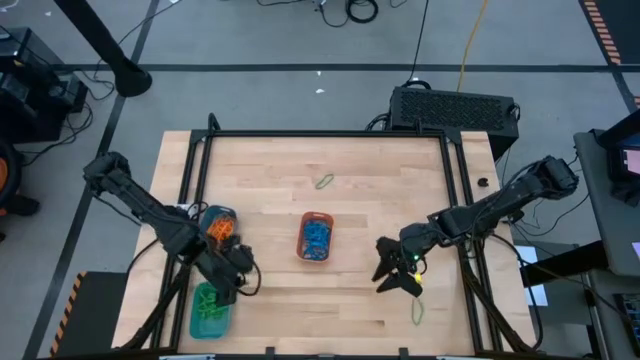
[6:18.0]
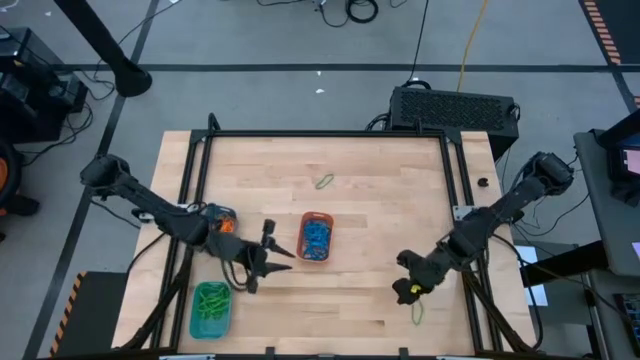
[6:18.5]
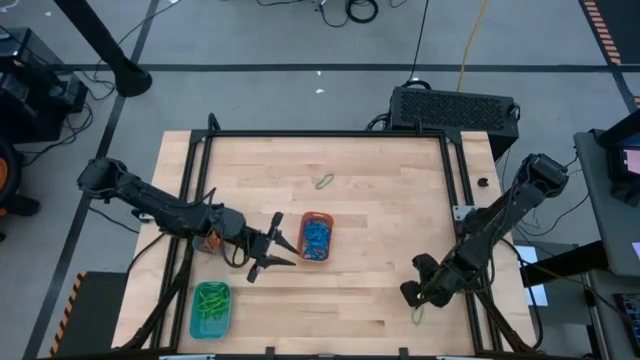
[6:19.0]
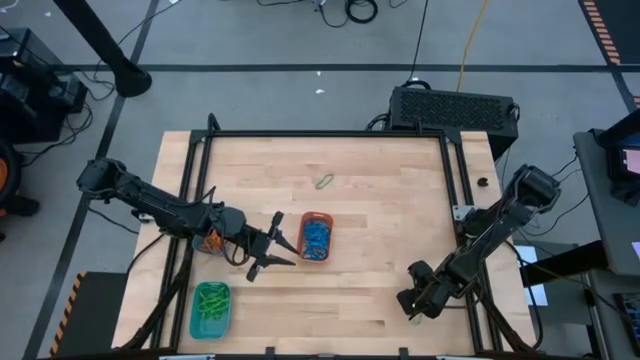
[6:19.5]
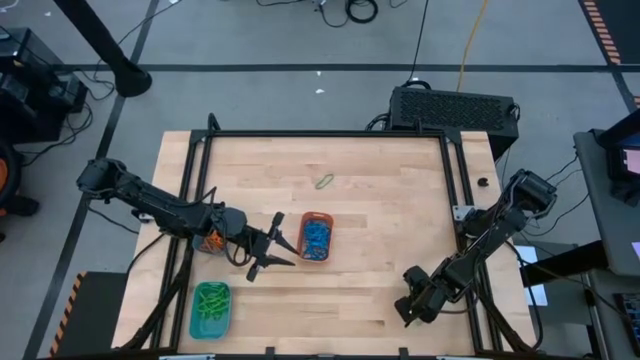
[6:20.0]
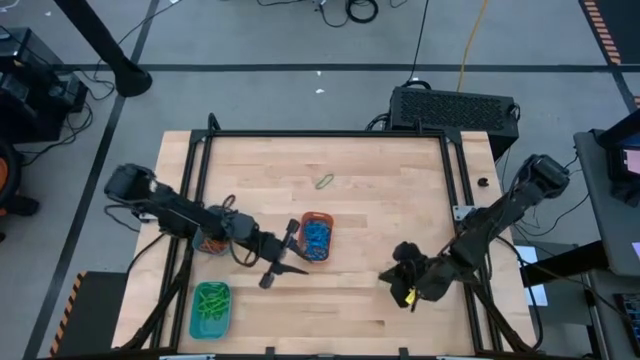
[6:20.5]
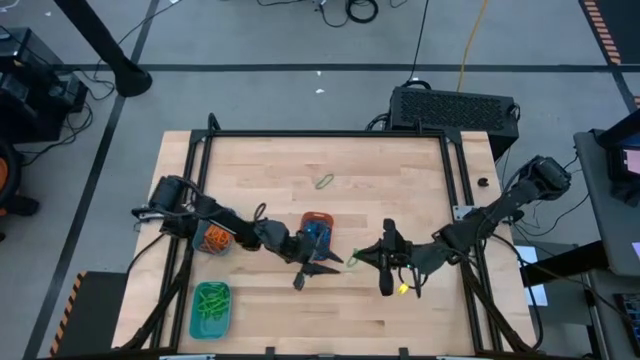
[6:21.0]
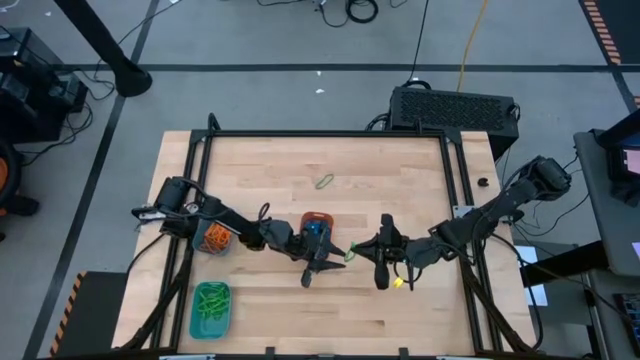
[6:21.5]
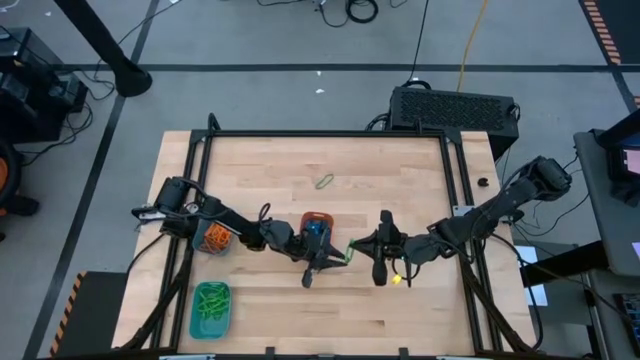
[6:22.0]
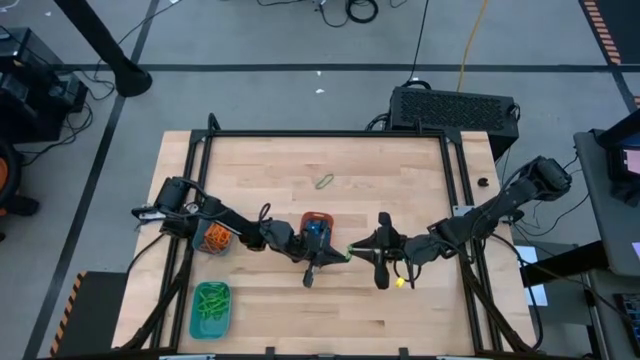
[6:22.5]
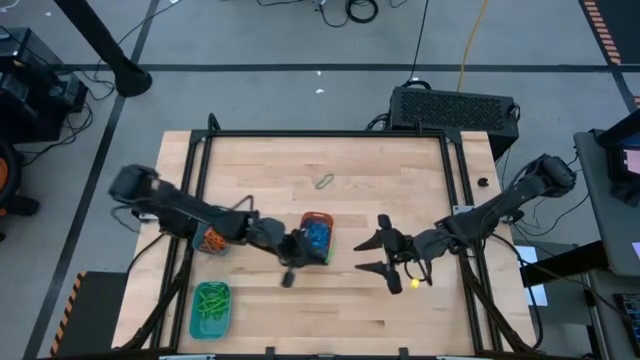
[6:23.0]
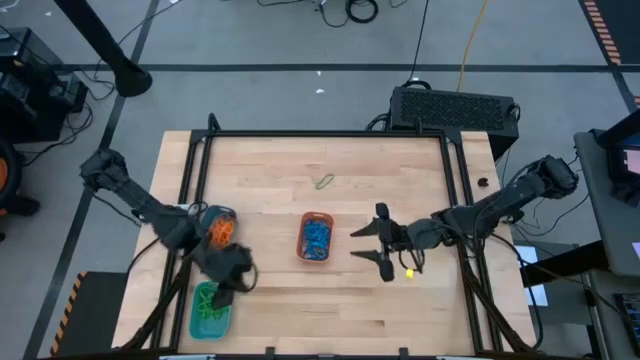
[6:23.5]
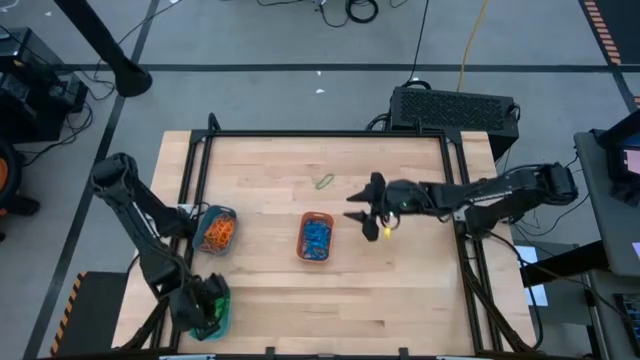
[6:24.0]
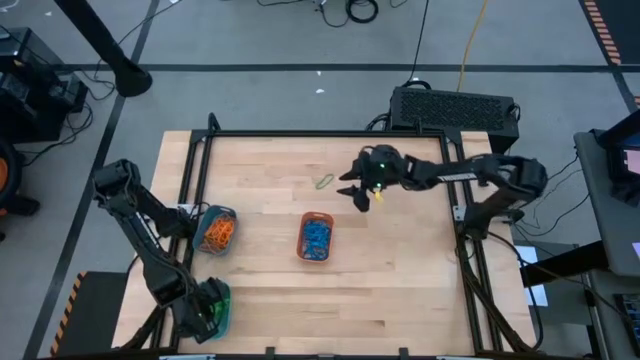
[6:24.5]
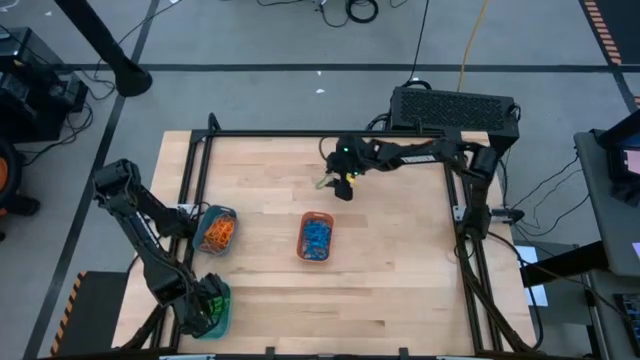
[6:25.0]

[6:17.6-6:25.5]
Task: Sort rubber bands into baskets
Put the green rubber band into the green bin

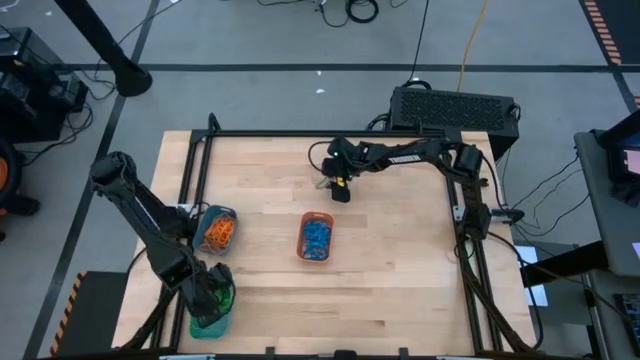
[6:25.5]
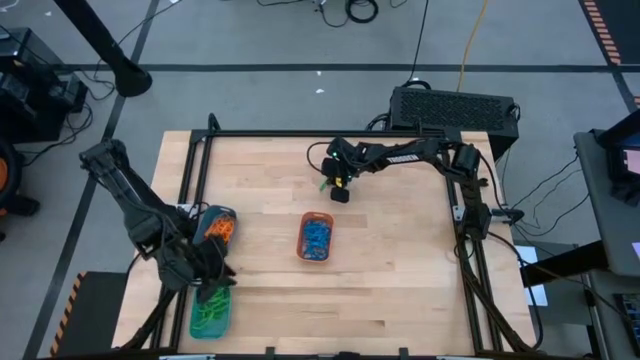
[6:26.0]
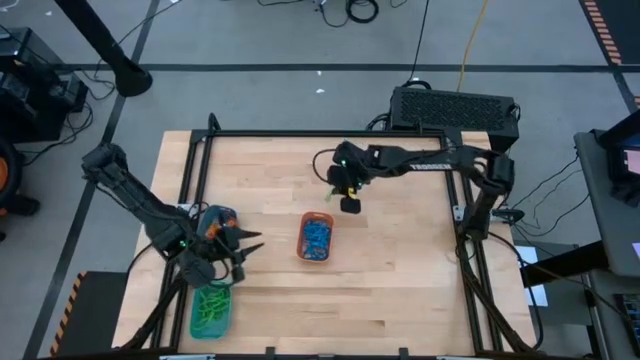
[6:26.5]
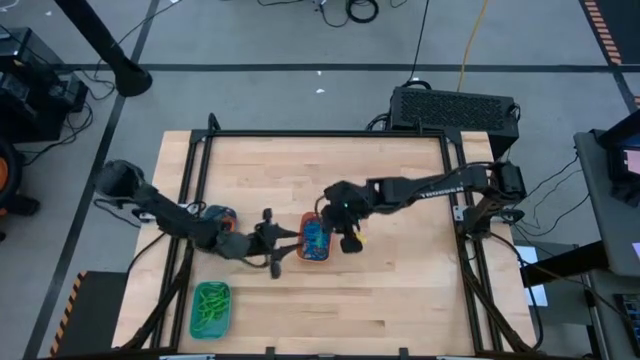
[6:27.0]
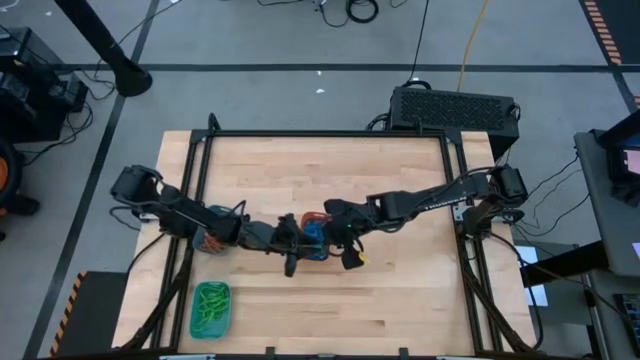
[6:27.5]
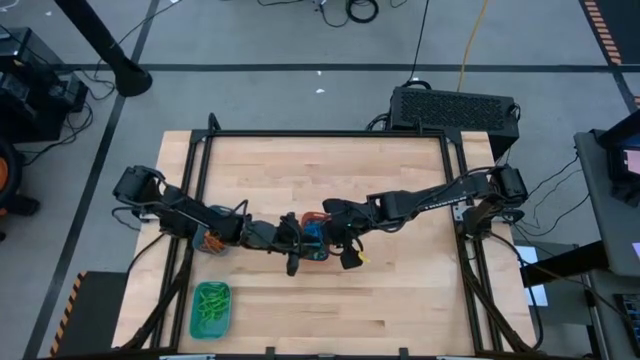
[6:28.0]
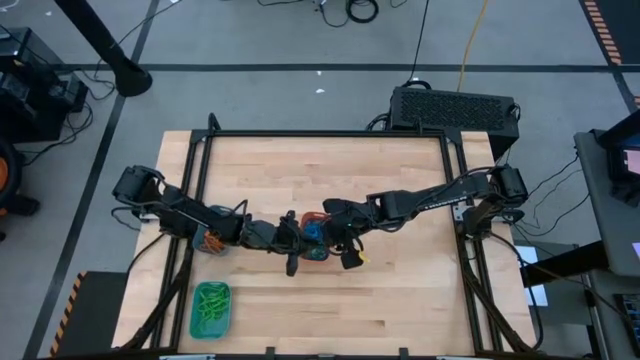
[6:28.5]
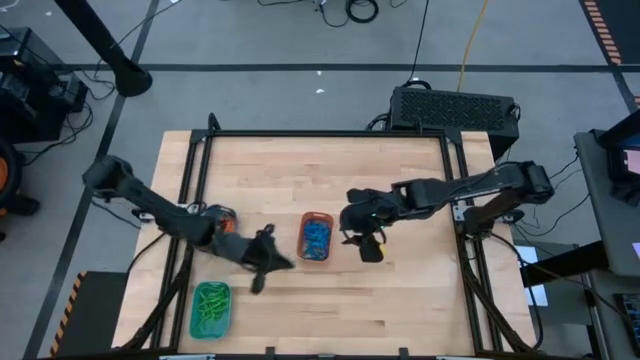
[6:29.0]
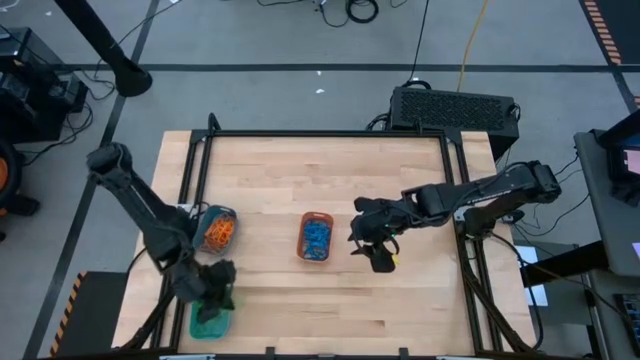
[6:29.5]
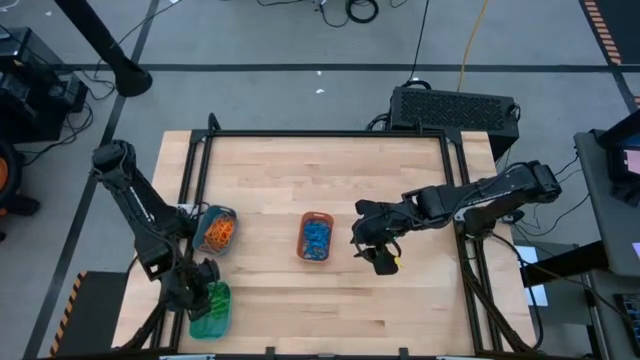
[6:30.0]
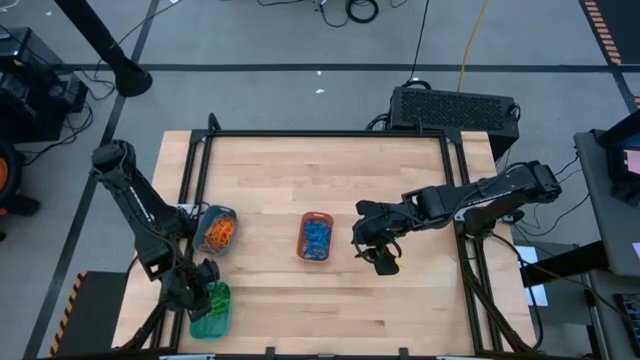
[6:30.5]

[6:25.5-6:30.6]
Put the green rubber band into the green bin

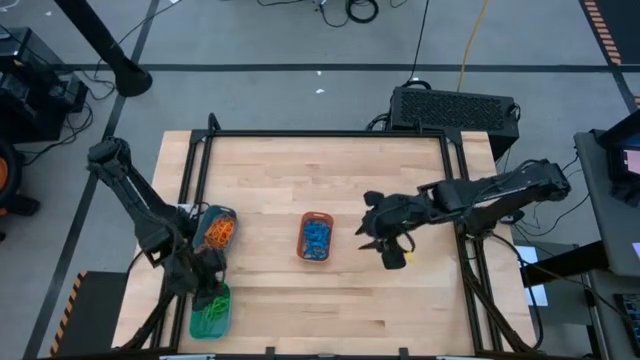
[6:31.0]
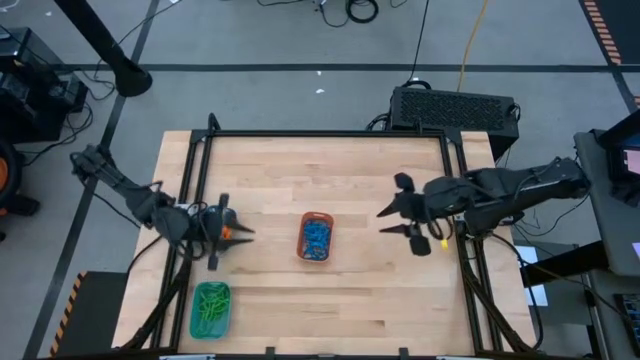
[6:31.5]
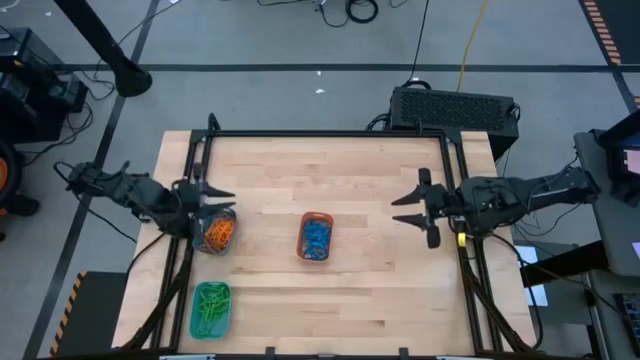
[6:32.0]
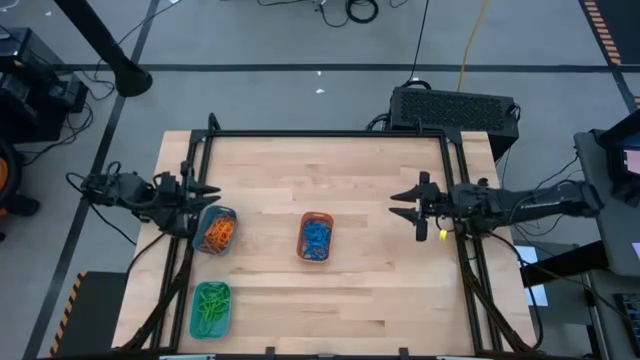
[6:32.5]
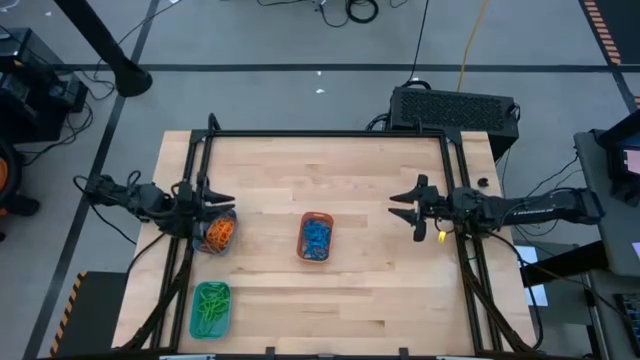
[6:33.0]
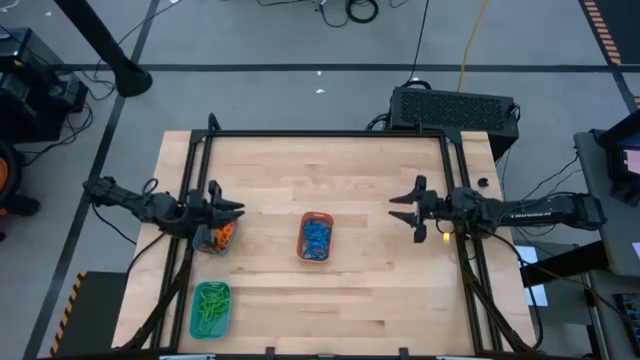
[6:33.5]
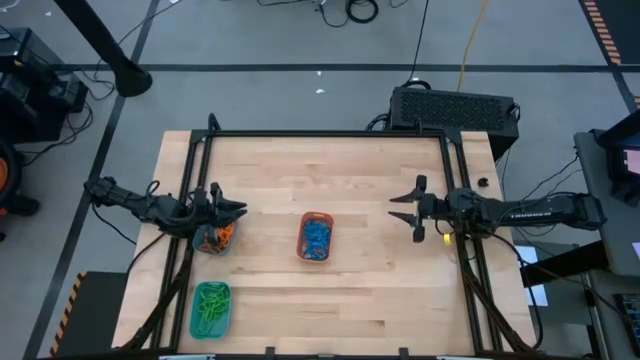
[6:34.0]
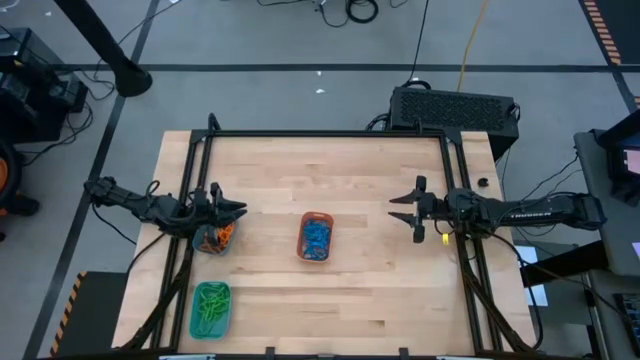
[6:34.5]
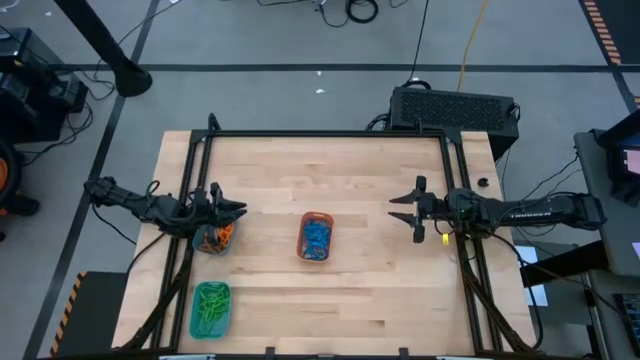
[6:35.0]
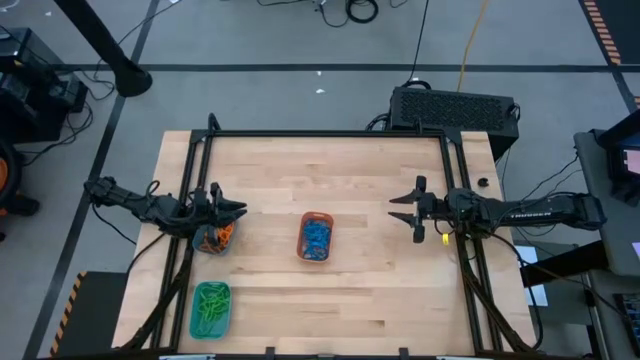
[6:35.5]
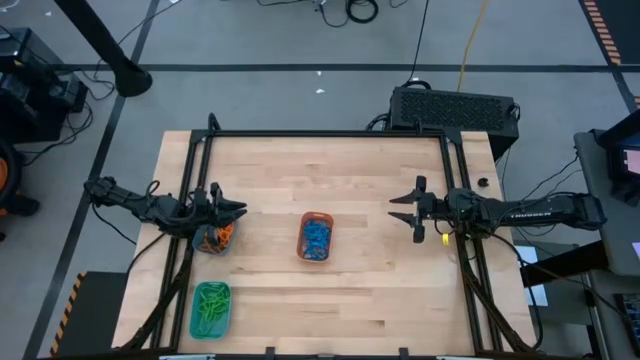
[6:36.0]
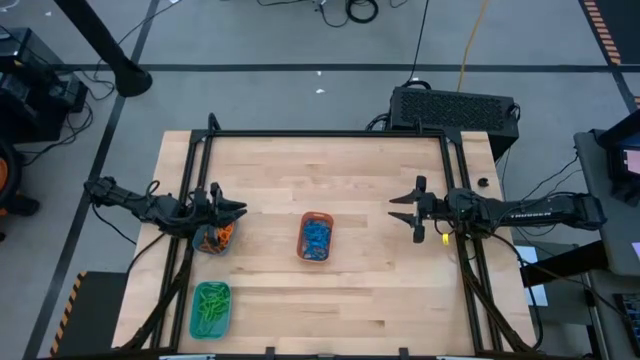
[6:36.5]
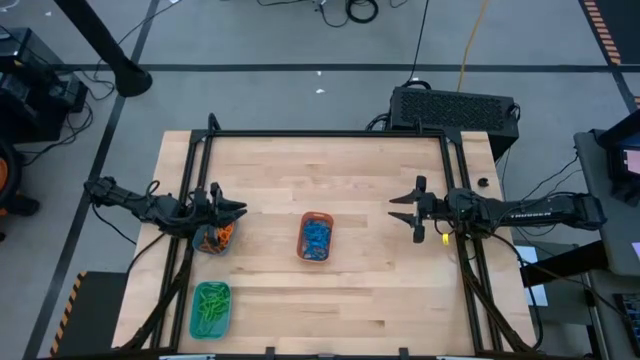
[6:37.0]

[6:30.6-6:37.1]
Return to Home Position
